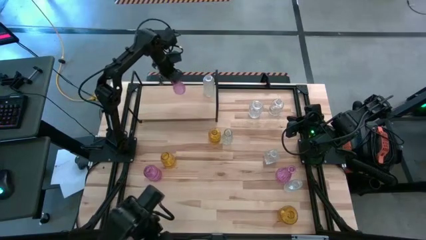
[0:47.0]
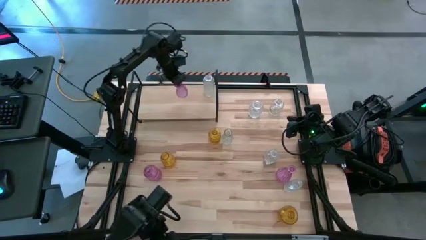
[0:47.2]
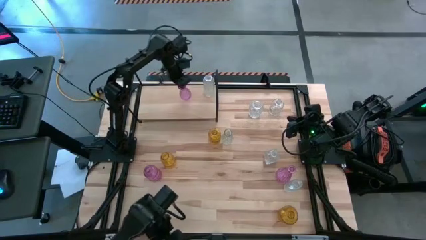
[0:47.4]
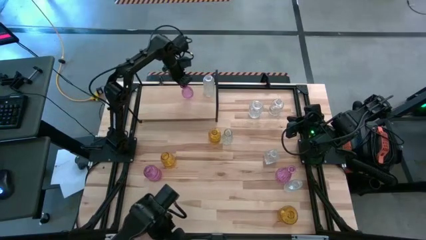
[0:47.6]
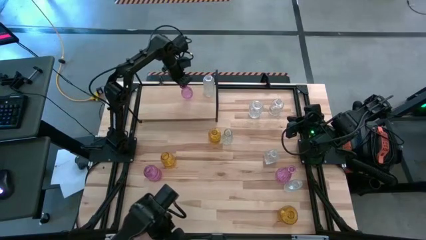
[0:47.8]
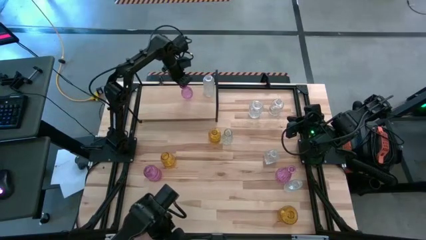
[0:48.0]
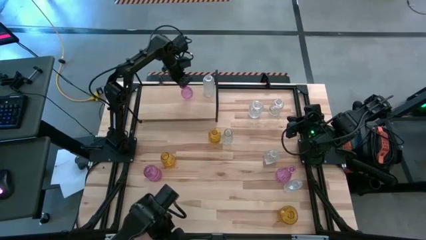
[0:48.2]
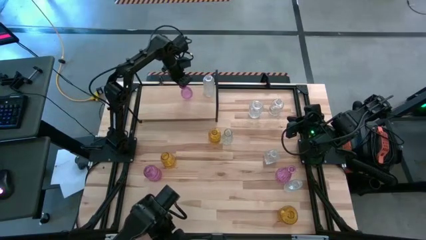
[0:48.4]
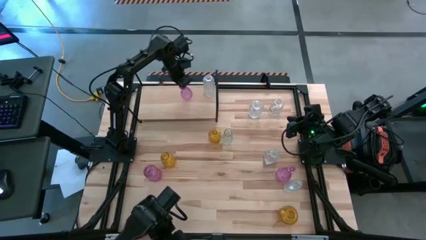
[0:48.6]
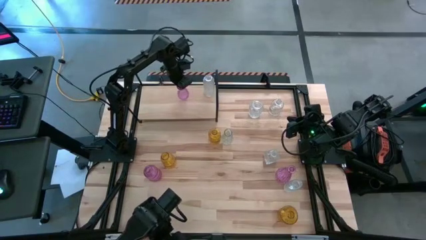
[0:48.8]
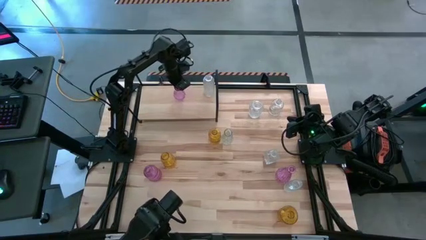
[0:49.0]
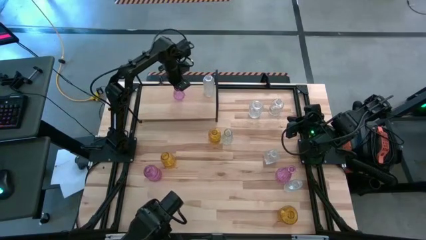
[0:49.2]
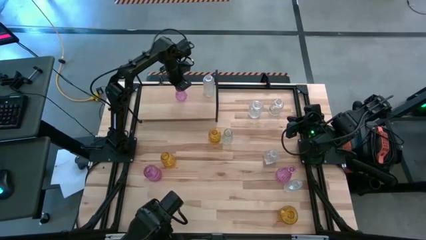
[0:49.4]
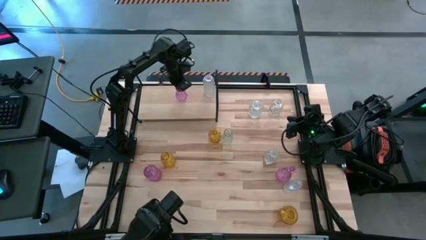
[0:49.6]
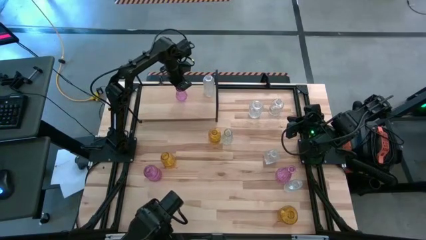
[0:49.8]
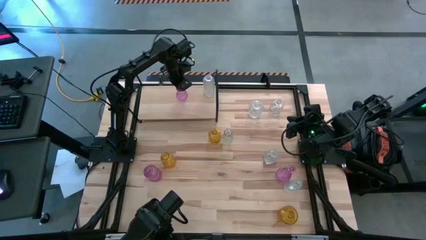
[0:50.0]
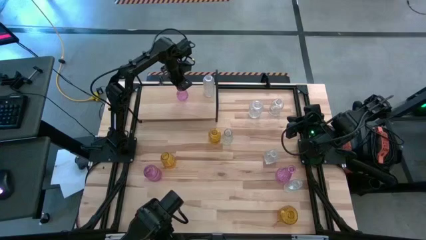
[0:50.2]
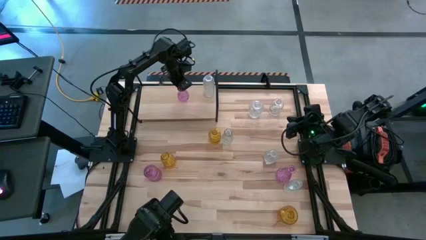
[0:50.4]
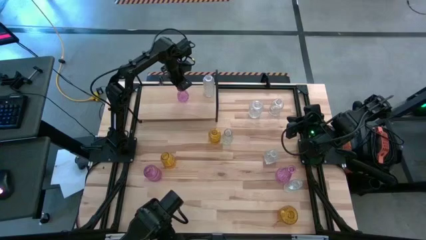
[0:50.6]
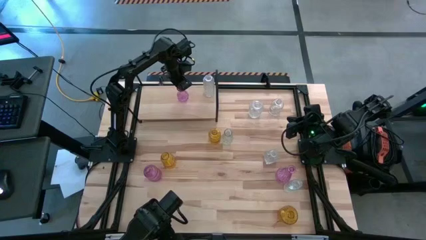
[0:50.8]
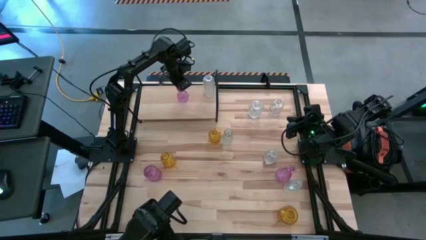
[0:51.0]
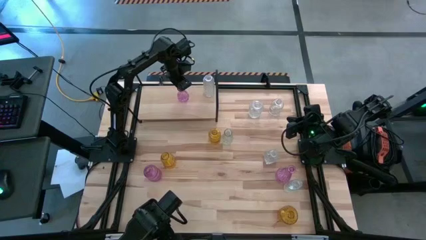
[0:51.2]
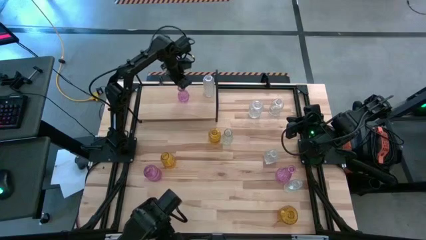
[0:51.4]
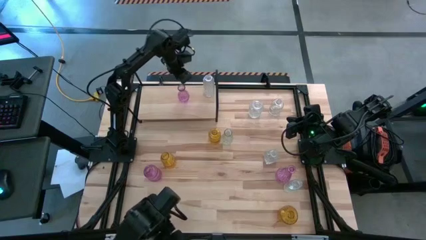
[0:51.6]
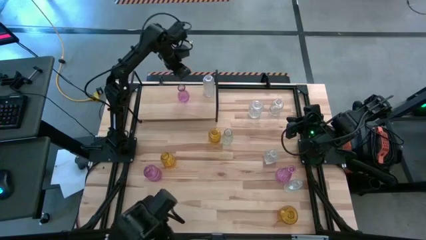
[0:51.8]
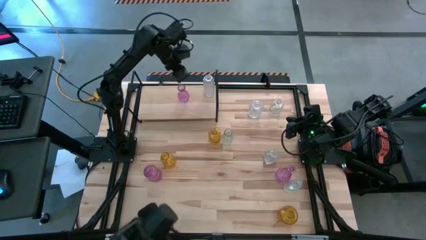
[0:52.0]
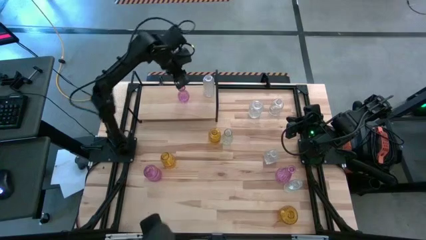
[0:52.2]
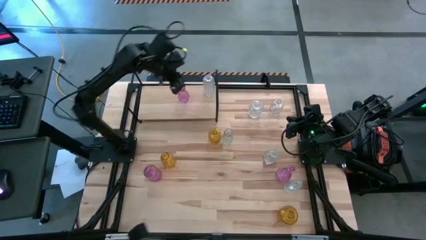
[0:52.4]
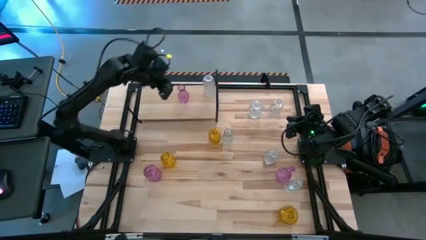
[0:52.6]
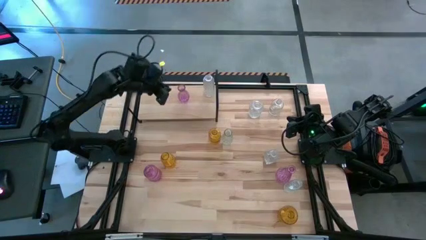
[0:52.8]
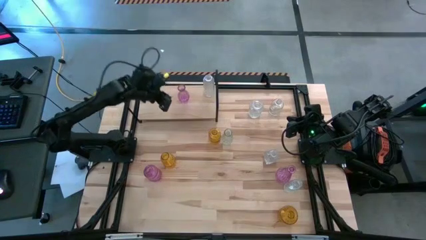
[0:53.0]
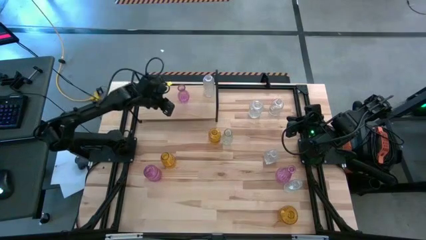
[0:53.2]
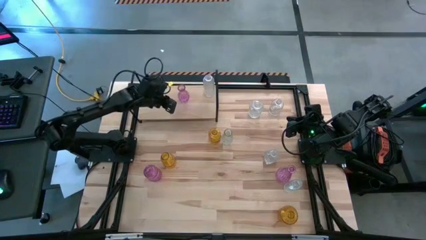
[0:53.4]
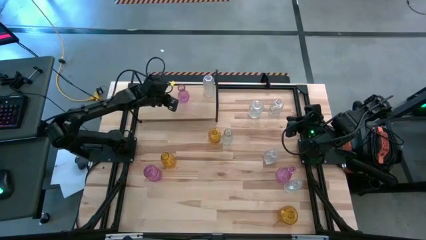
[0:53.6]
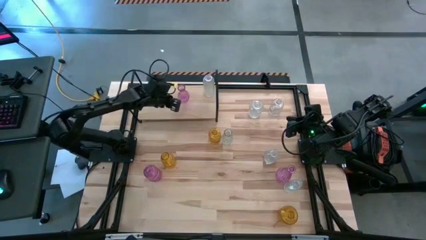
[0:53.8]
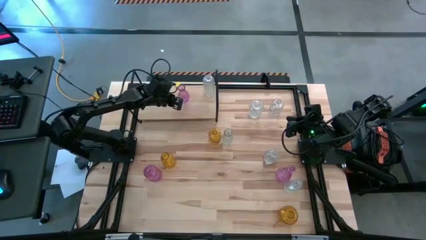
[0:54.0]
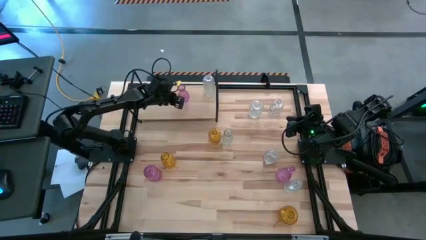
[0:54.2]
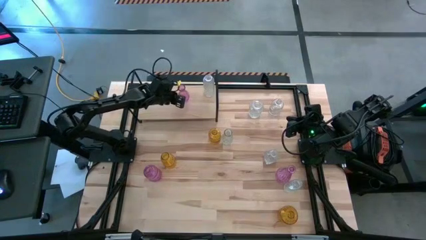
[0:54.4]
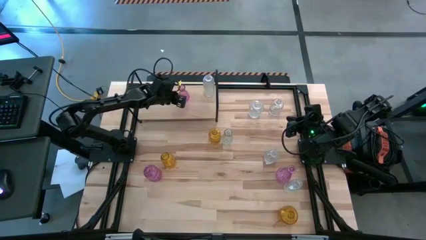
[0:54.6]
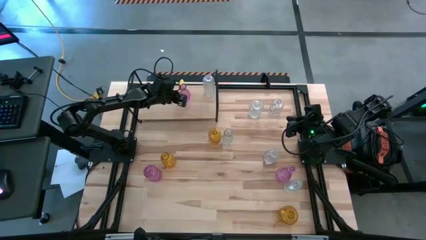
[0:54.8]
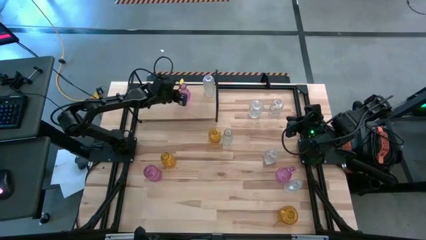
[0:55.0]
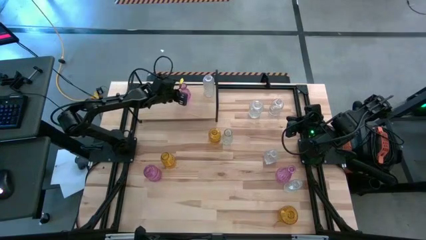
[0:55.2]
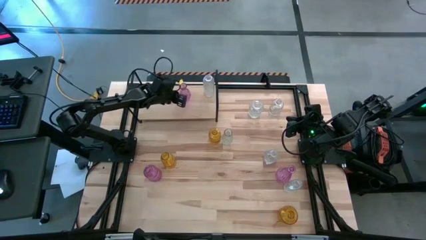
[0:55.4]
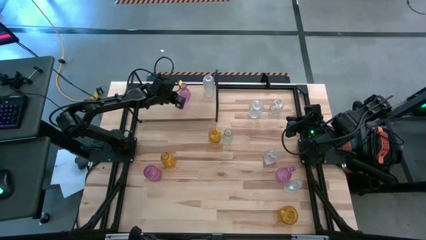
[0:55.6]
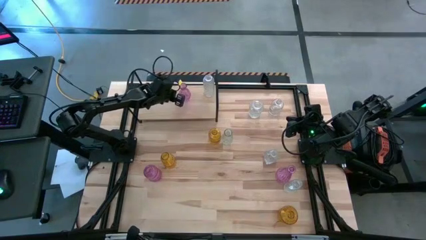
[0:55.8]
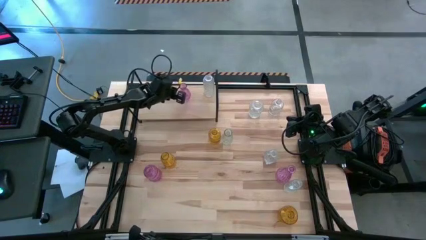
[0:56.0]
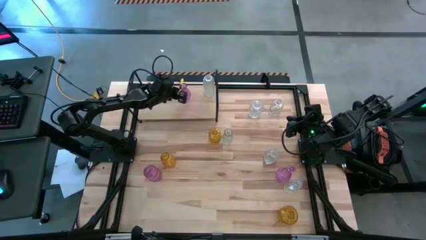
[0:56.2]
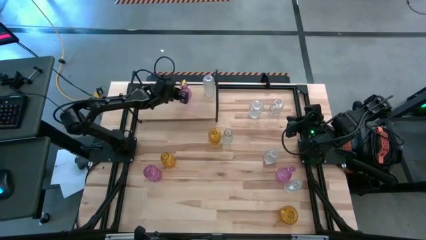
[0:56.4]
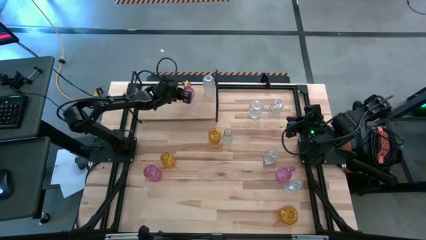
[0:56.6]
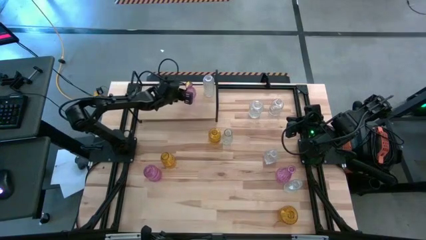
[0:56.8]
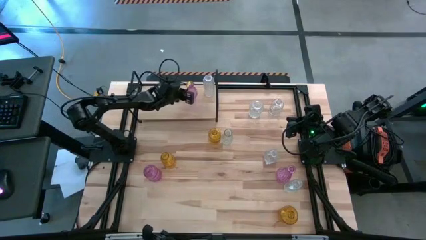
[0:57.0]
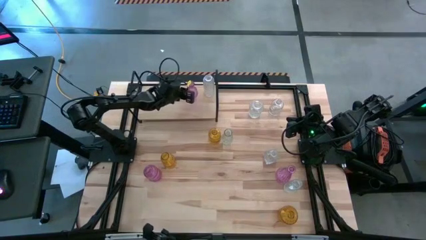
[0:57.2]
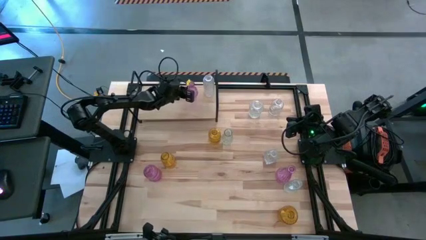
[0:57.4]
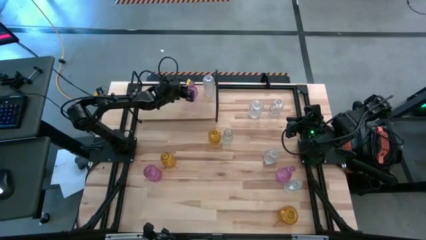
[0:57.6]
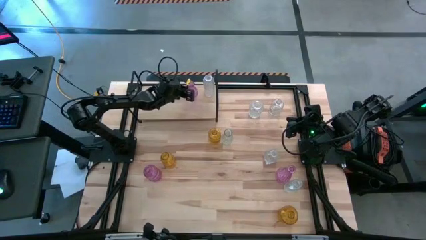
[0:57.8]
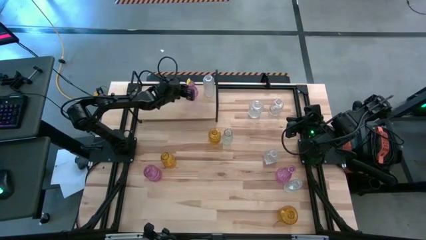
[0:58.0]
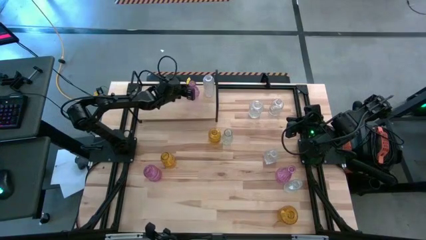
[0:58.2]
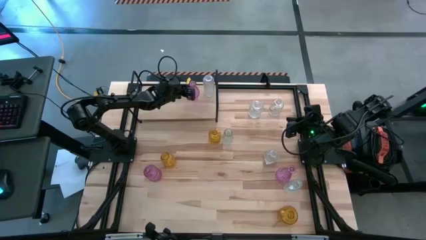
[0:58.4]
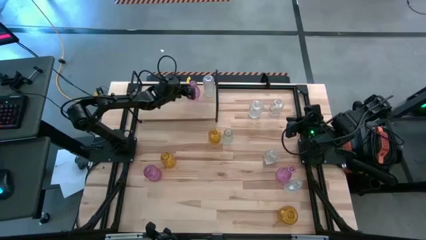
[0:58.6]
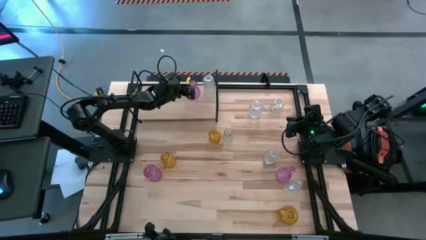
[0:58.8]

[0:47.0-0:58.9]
Task: sort vases onto shelf
Put the pink vase to the left of the transparent vase on the shelf

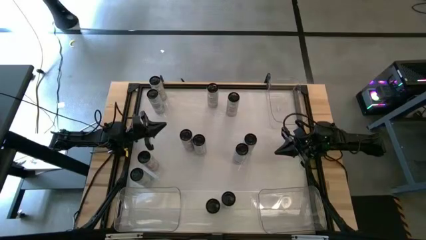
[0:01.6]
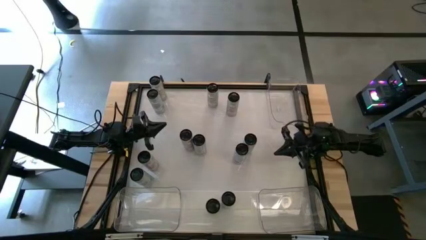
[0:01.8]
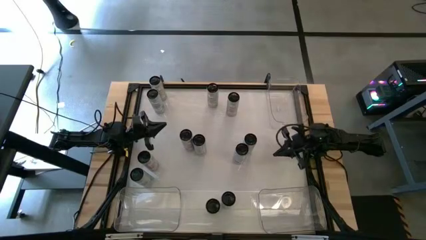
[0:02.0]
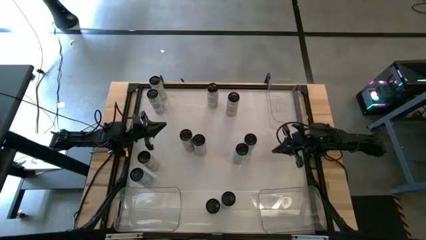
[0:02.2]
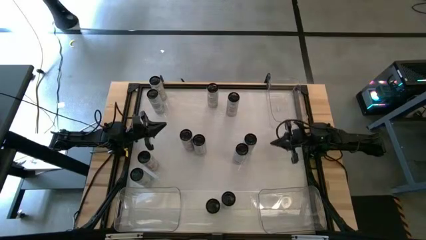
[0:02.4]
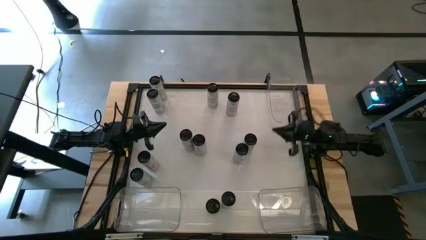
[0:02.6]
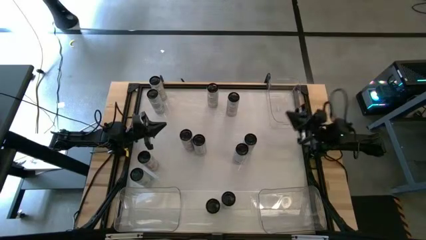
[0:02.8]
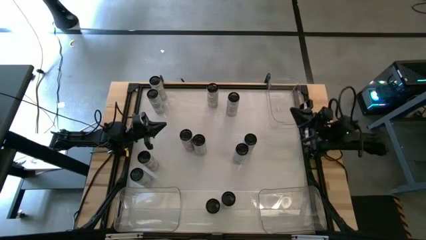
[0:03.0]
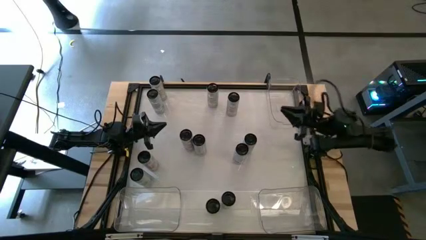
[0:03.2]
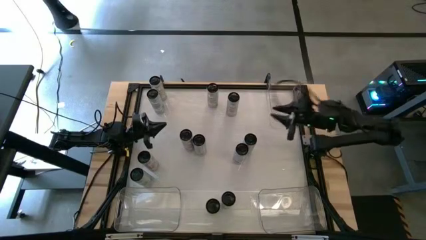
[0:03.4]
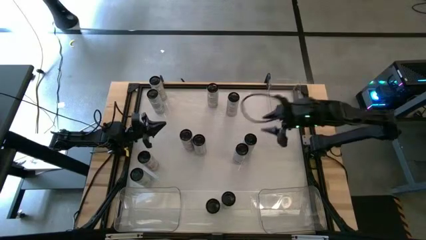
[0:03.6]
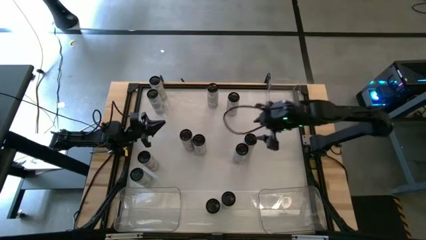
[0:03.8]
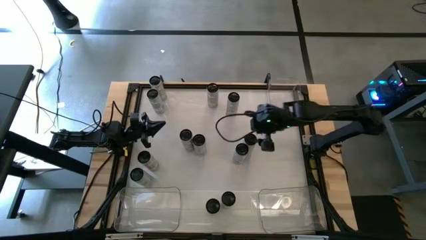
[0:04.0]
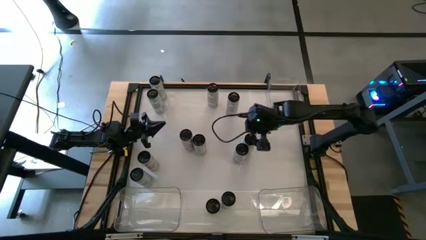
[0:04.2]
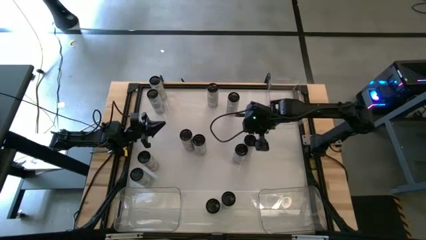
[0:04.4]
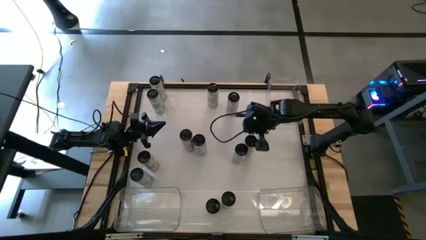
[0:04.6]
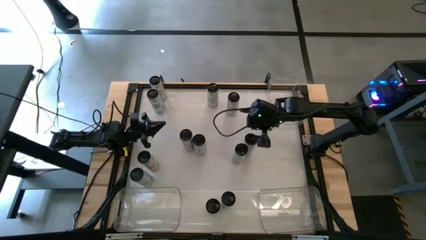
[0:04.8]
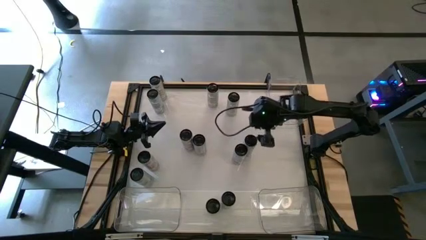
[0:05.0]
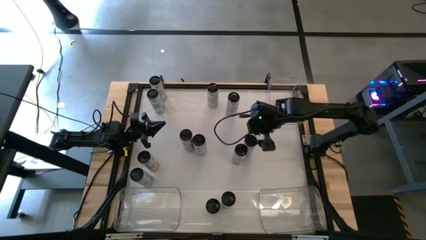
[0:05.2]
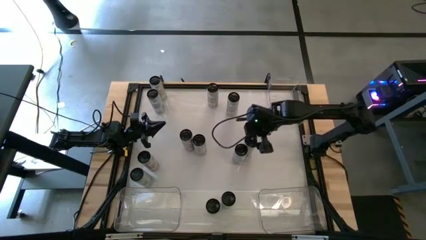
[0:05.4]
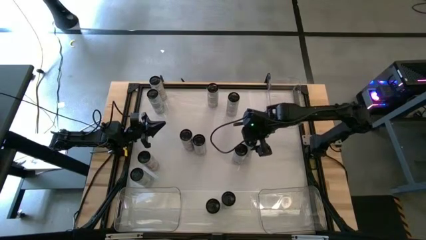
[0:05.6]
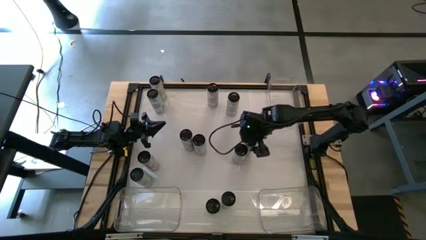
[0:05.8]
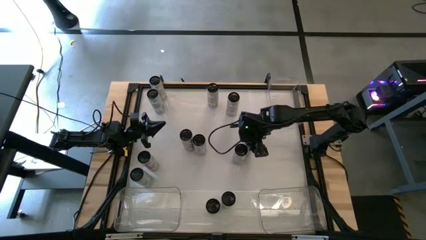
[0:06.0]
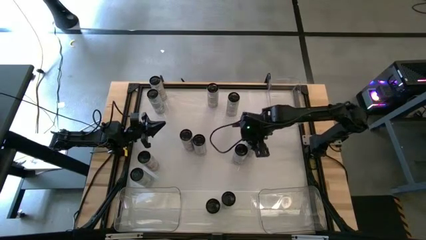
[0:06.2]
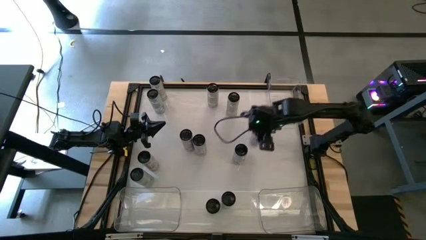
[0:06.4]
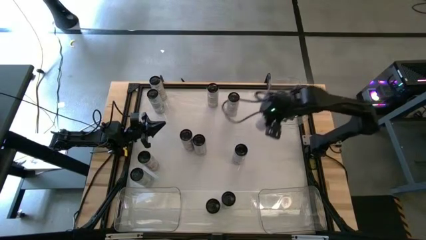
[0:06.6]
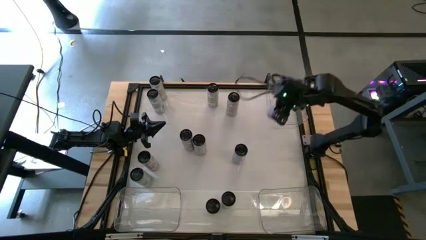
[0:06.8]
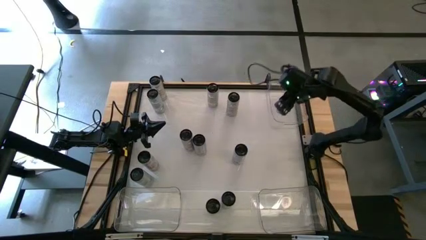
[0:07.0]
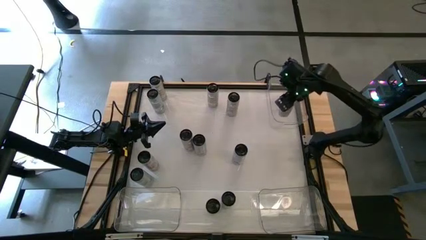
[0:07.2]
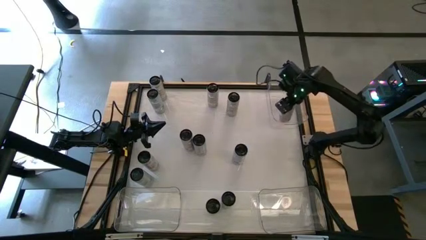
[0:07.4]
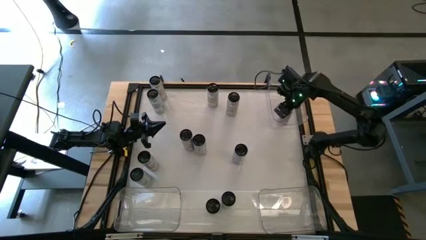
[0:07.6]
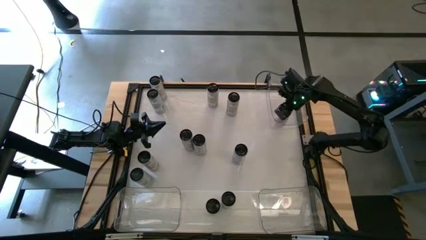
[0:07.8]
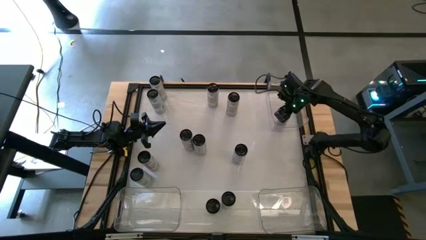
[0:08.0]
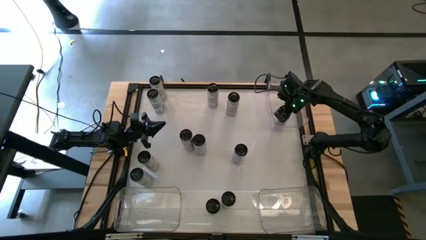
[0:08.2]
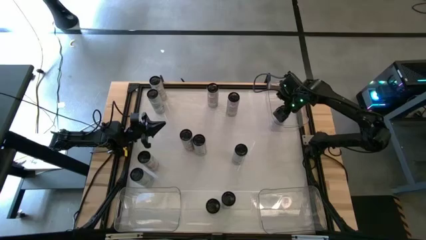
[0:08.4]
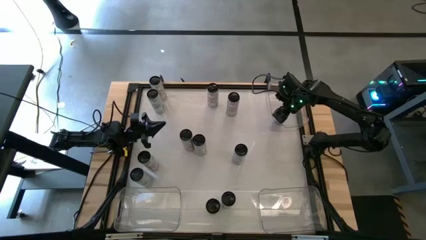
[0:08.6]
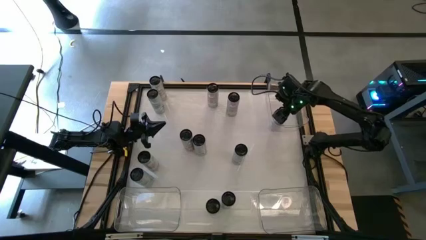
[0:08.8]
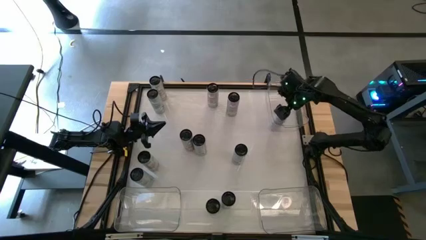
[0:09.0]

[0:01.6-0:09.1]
Task: Sort soda cans
Put the right white-pink soda can into the top transparent bin
